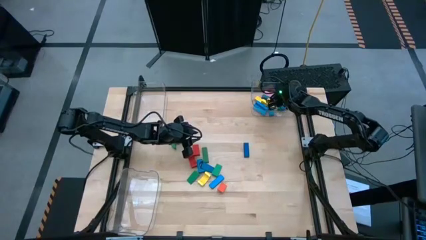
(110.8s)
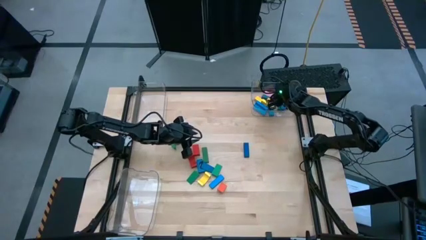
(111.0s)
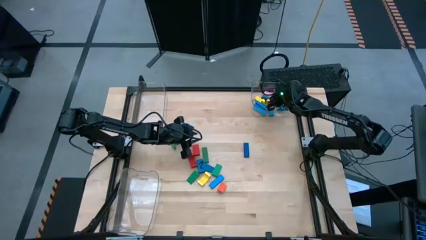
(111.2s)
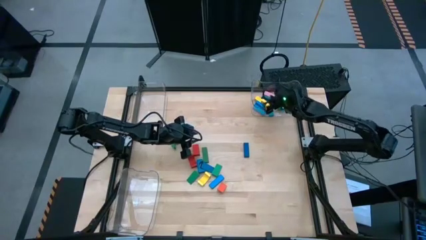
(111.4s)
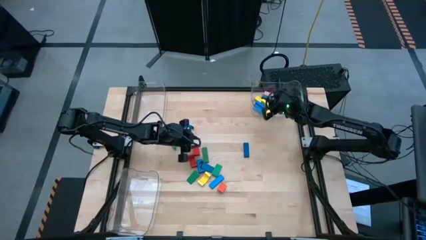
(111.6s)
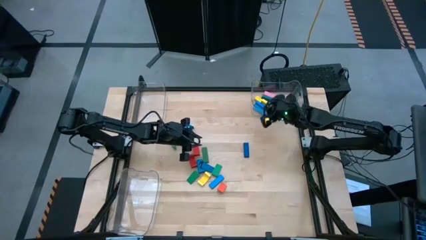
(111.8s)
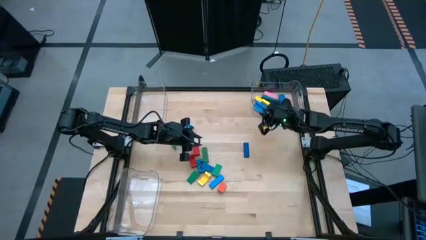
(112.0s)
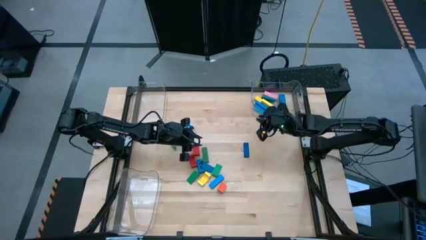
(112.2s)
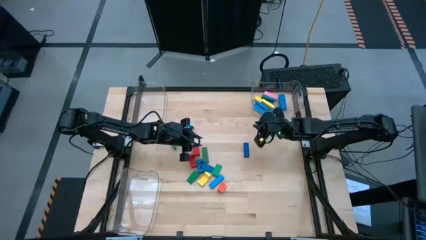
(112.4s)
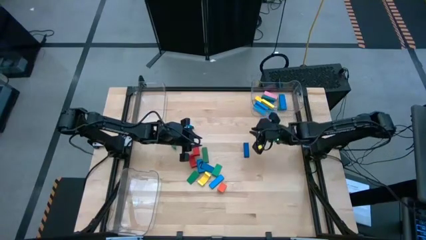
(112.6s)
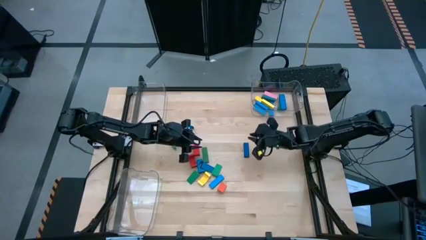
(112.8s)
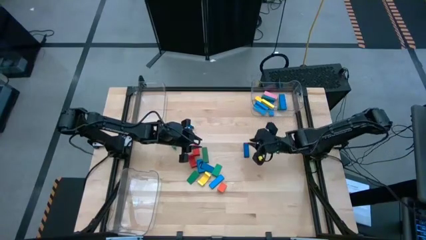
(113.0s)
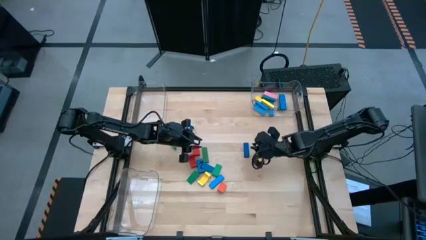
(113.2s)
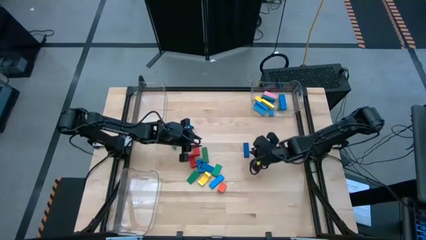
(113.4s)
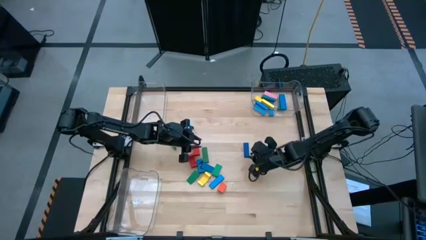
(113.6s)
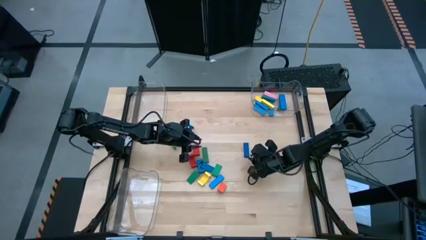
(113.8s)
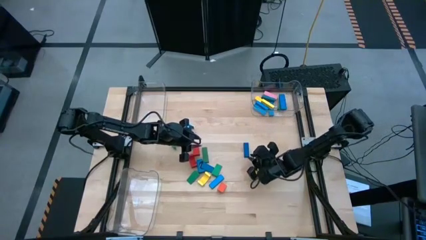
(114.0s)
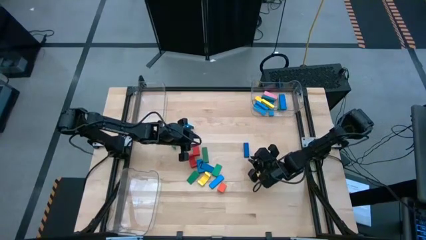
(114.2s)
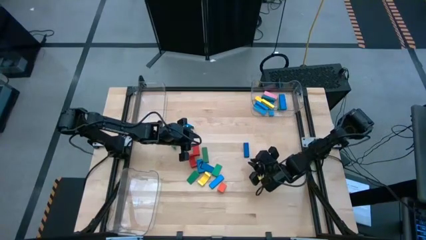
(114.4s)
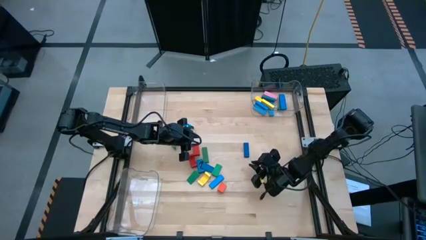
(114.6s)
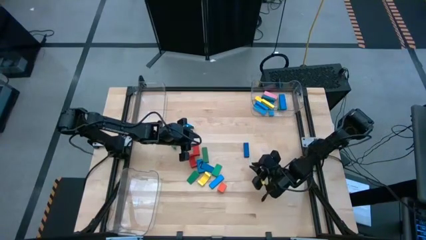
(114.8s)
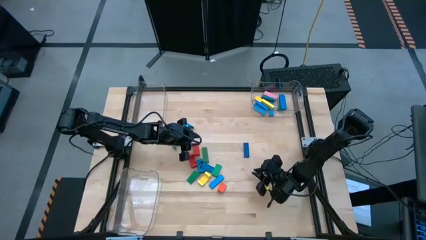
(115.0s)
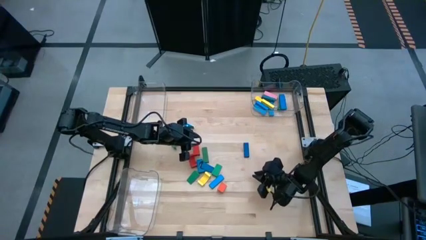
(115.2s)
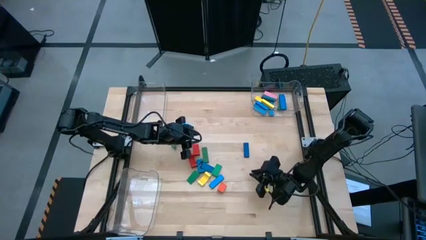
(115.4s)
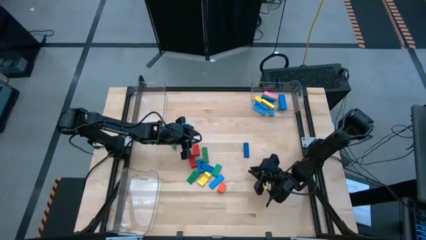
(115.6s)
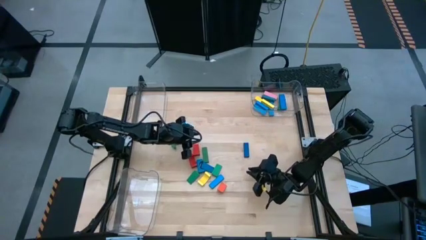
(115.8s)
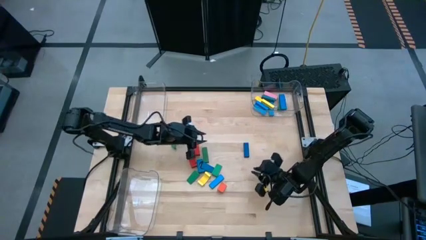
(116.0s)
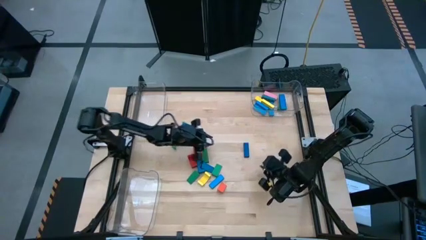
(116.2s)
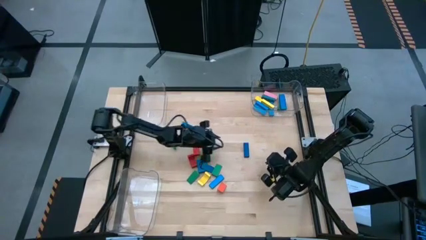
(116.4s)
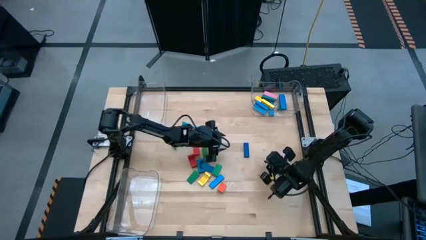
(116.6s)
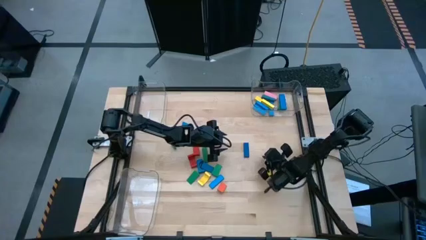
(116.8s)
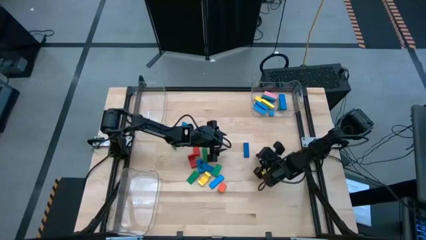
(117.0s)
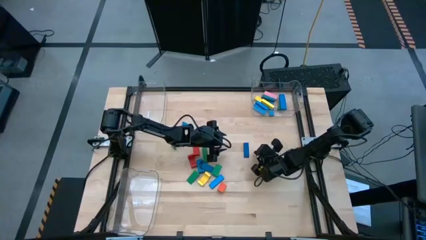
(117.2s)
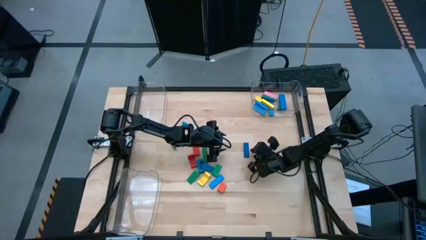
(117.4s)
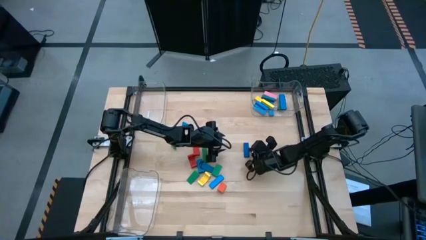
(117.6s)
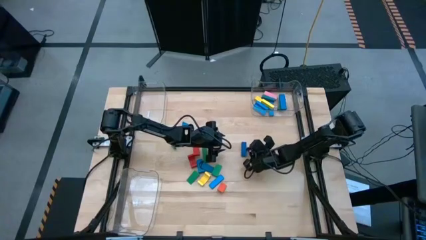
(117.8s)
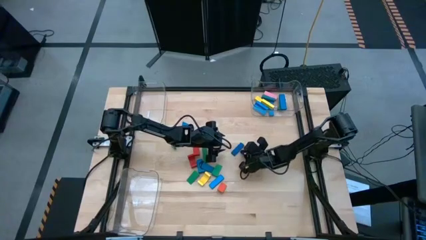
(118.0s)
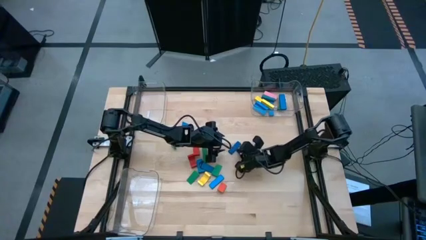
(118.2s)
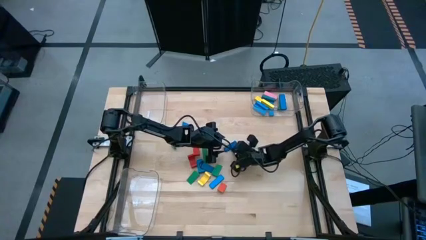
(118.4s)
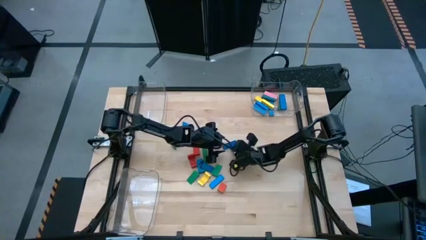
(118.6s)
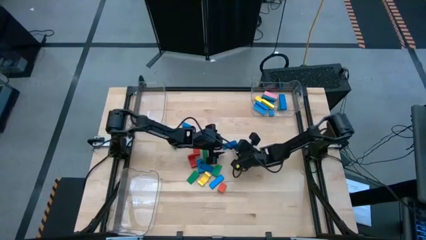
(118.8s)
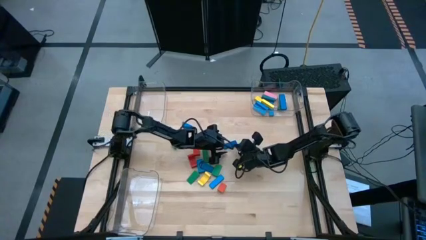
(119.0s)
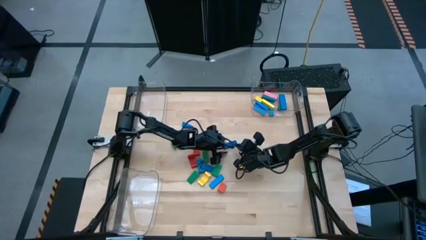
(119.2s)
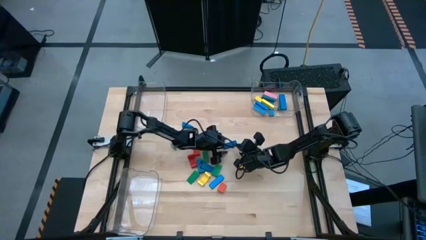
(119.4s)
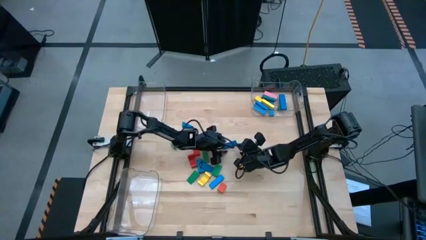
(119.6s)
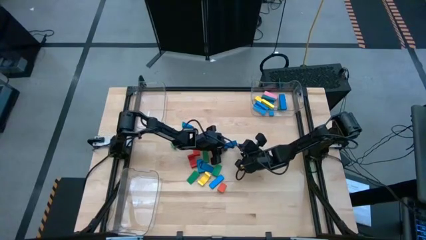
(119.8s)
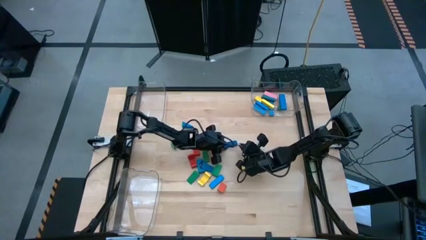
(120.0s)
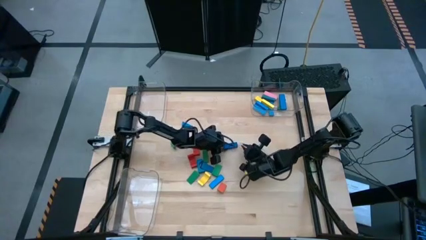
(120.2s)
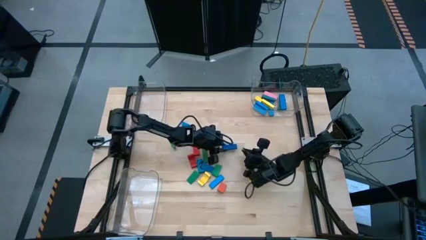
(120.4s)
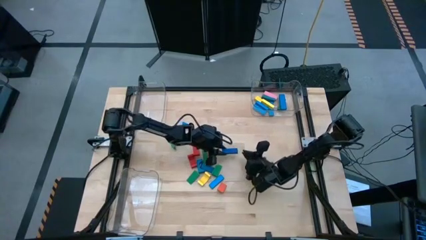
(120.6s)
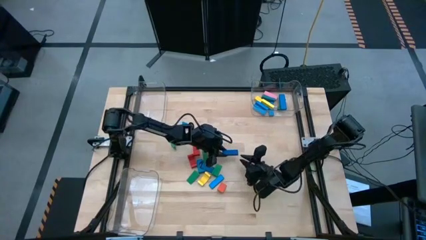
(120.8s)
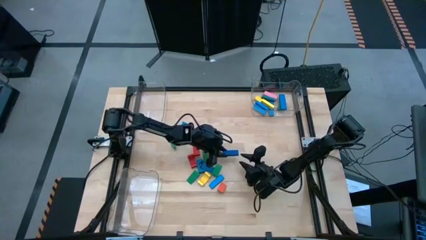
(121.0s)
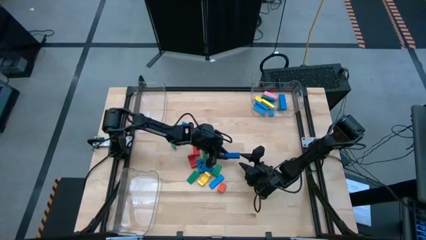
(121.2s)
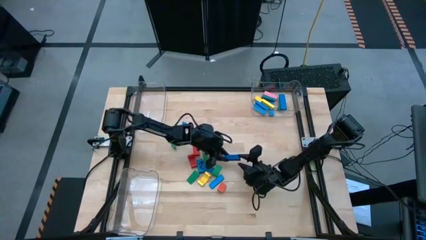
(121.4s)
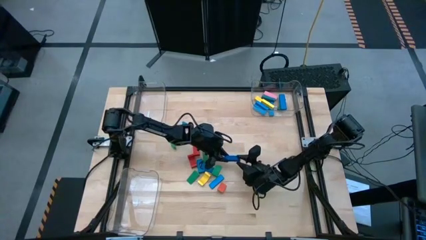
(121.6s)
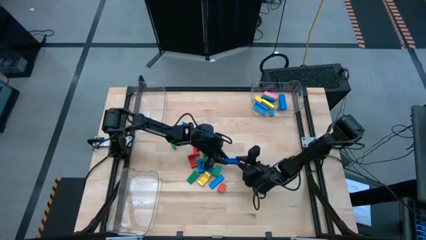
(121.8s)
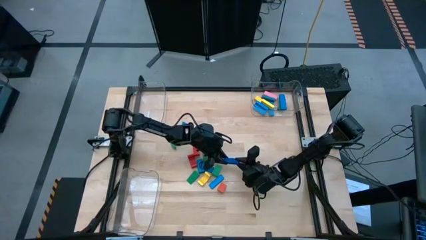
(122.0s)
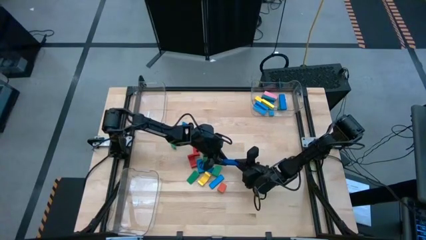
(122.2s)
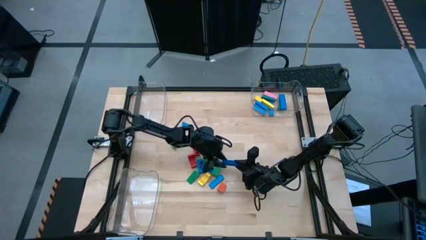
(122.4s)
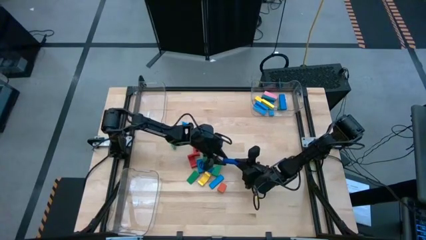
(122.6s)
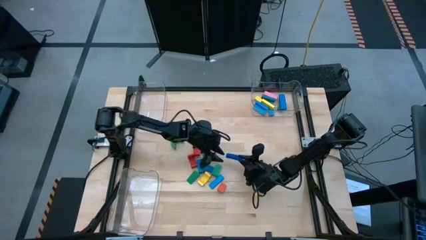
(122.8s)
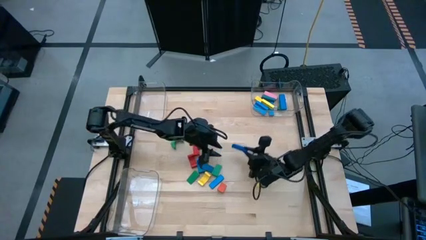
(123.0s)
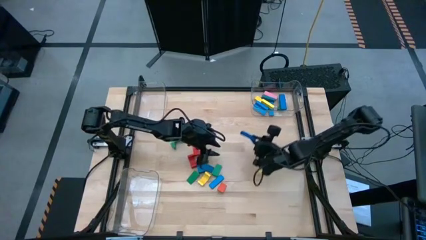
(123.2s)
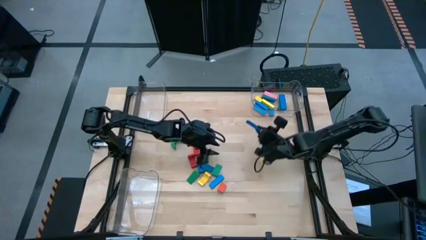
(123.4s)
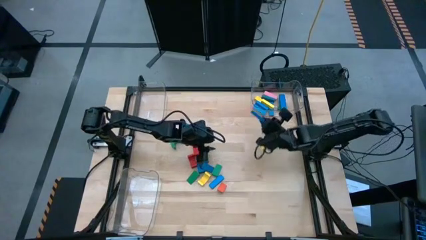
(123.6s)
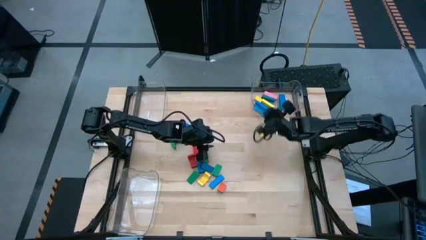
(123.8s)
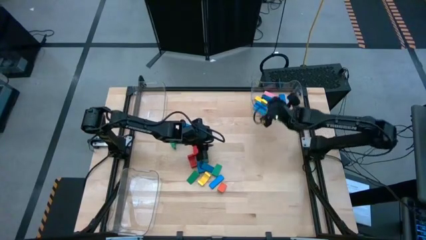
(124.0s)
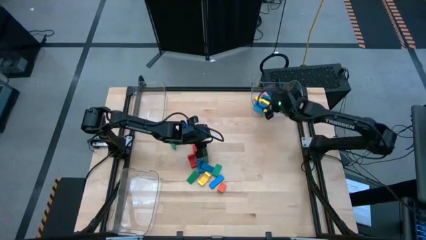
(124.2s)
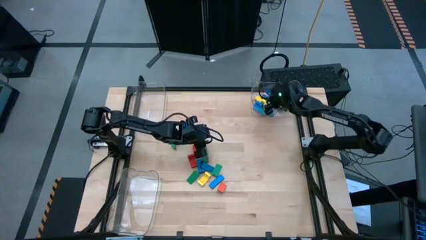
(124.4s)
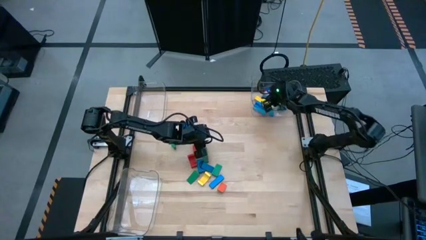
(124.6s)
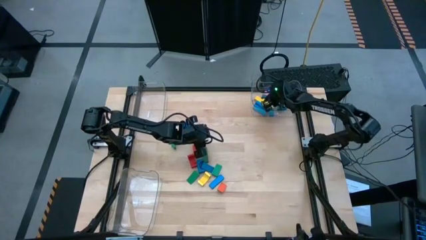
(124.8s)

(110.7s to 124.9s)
Task: Sort blocks by size
Put the blue rectangular block into the top right transparent bin

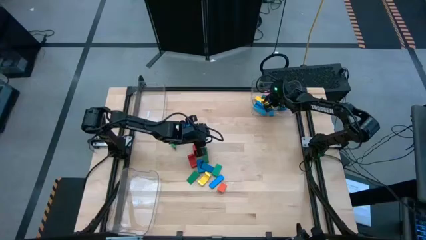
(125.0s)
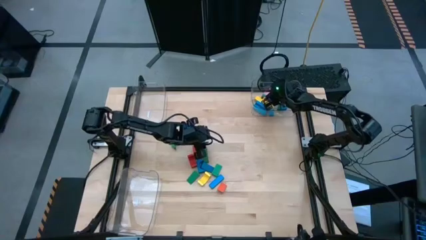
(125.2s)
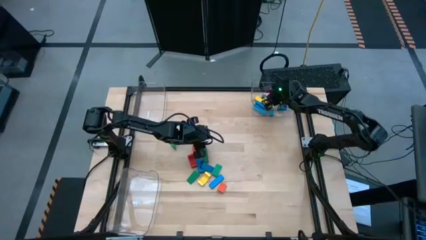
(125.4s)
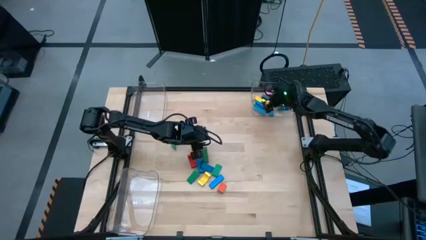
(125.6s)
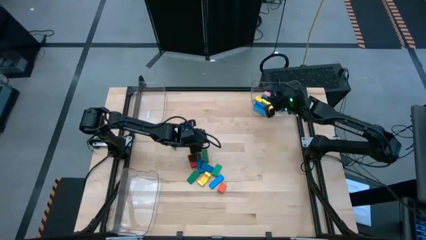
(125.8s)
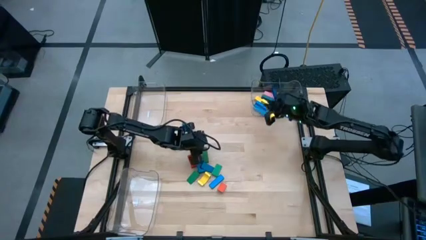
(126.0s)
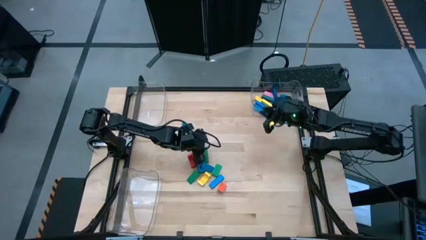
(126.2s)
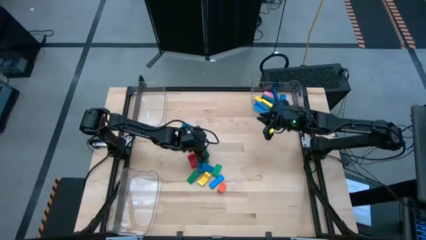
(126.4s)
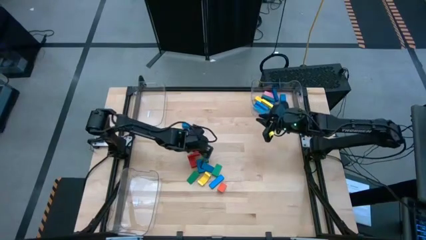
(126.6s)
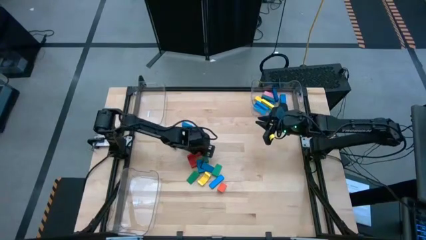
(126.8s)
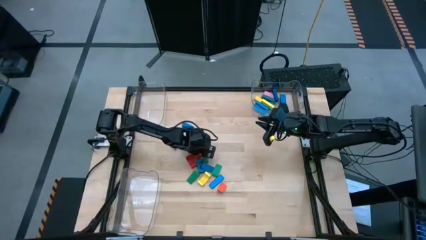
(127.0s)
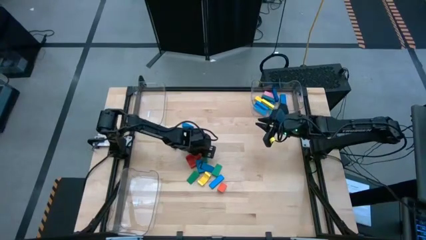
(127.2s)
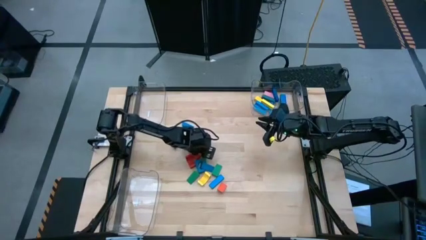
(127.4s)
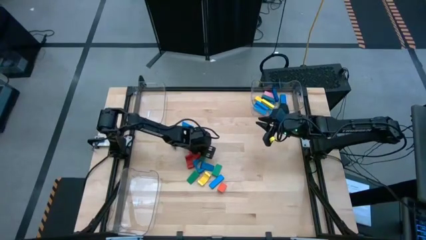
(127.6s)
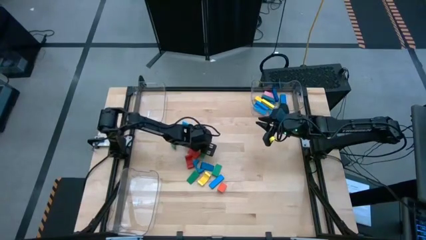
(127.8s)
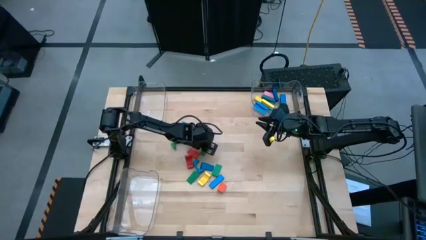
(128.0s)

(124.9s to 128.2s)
Put the green rectangular block into the top right transparent bin
